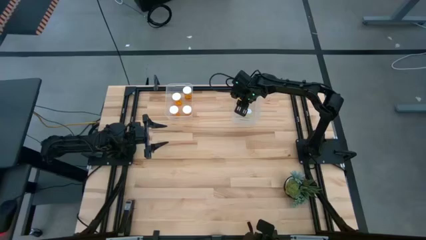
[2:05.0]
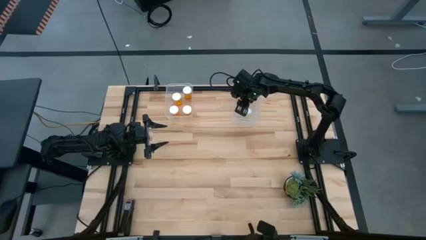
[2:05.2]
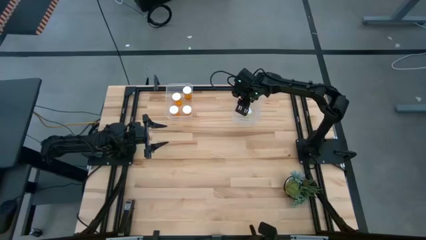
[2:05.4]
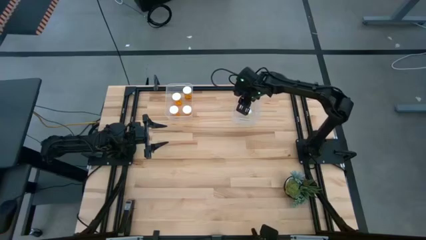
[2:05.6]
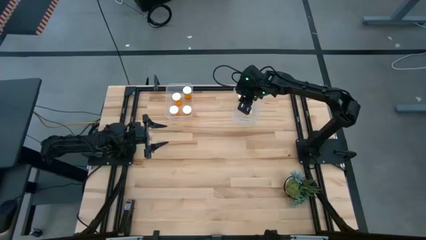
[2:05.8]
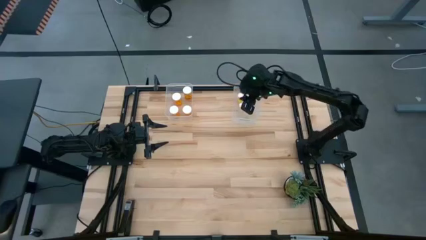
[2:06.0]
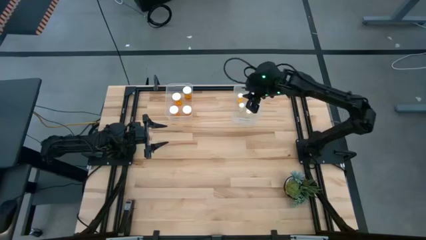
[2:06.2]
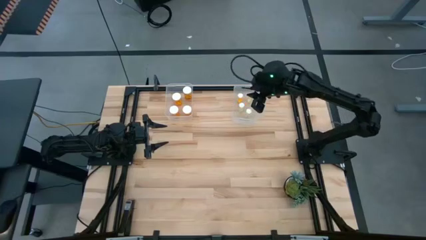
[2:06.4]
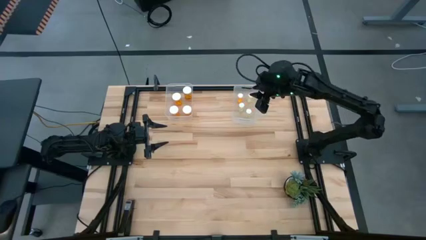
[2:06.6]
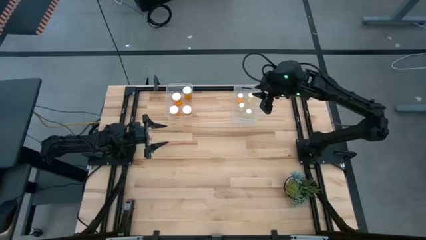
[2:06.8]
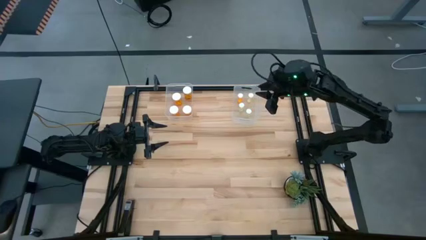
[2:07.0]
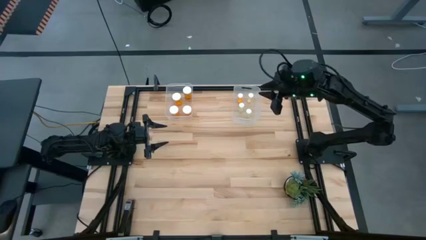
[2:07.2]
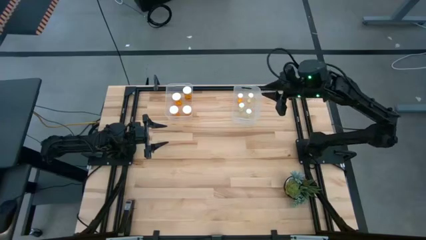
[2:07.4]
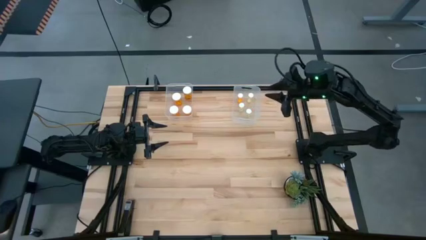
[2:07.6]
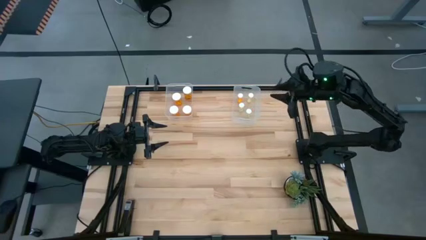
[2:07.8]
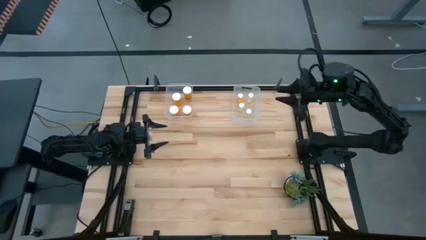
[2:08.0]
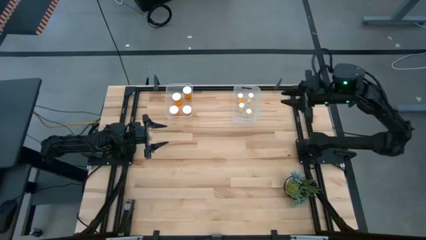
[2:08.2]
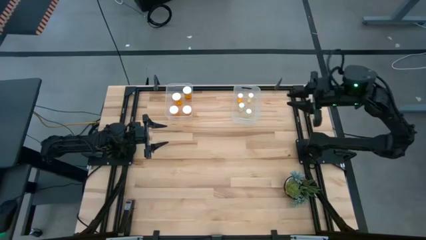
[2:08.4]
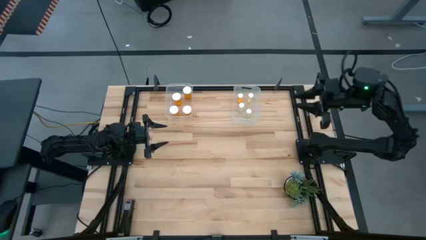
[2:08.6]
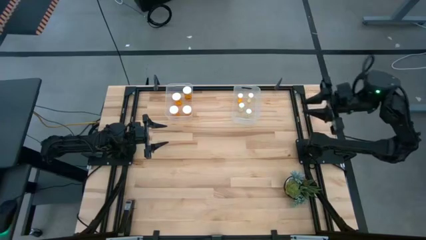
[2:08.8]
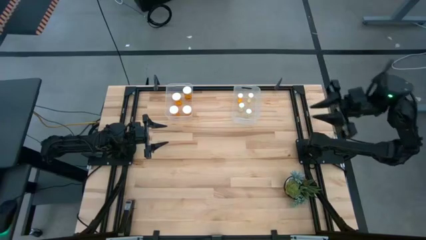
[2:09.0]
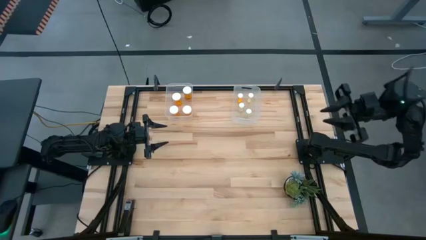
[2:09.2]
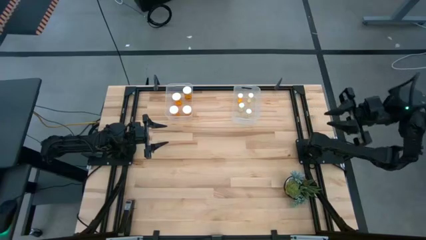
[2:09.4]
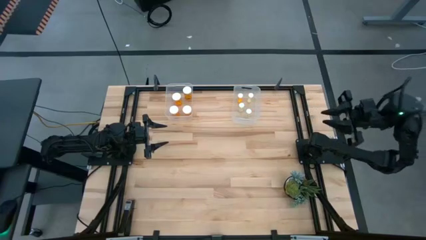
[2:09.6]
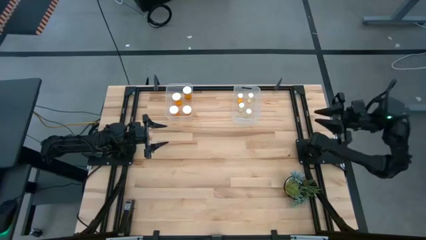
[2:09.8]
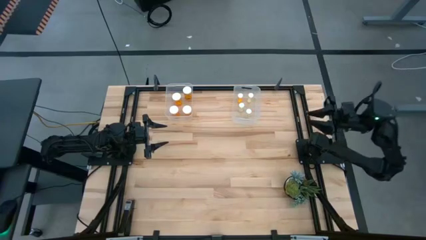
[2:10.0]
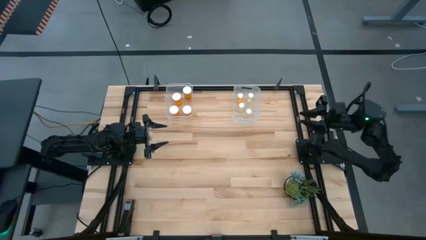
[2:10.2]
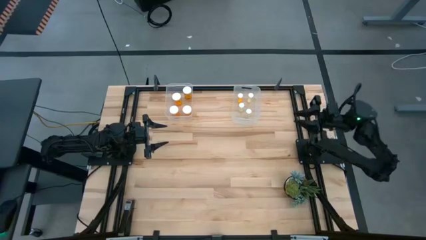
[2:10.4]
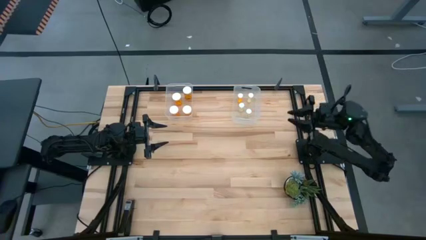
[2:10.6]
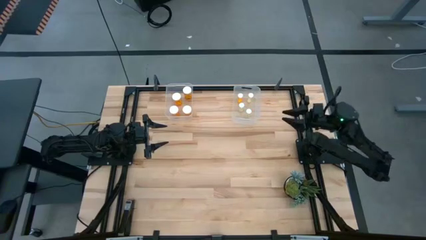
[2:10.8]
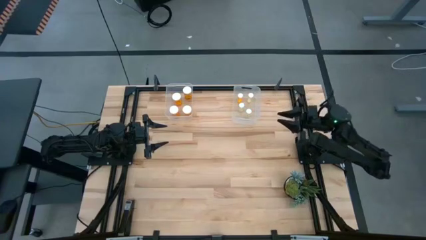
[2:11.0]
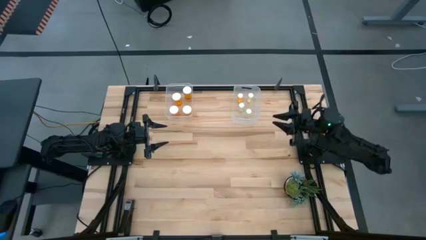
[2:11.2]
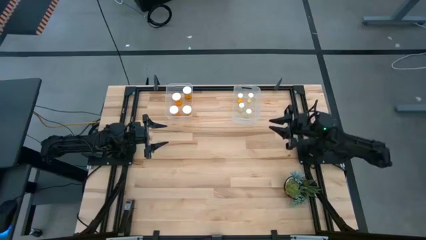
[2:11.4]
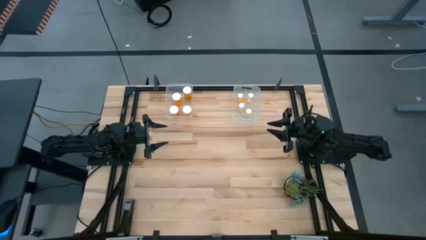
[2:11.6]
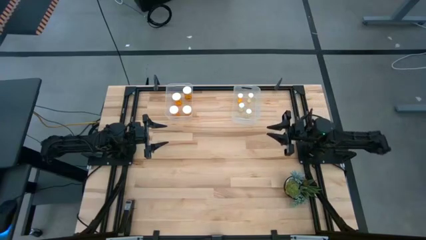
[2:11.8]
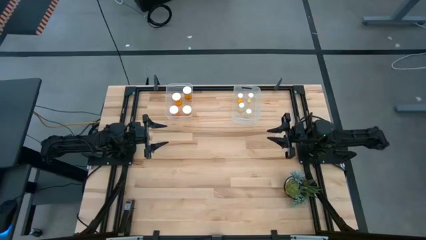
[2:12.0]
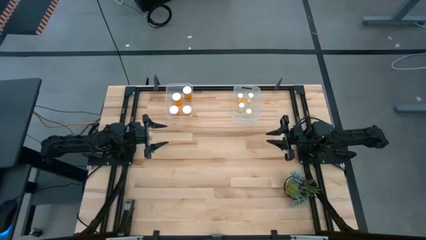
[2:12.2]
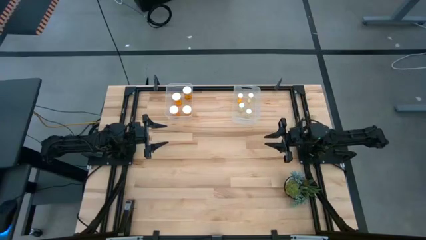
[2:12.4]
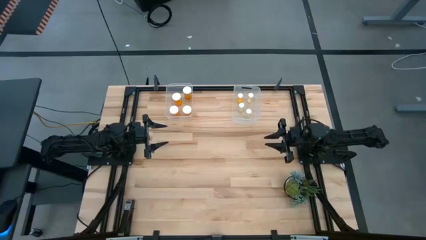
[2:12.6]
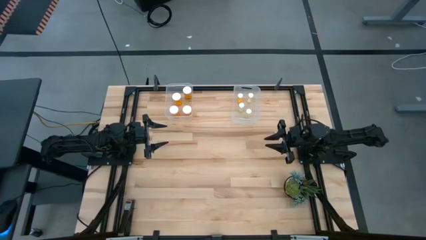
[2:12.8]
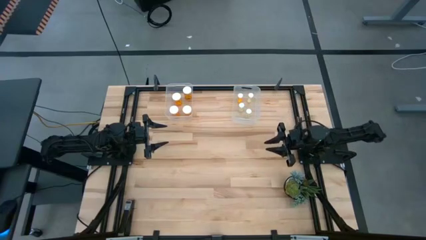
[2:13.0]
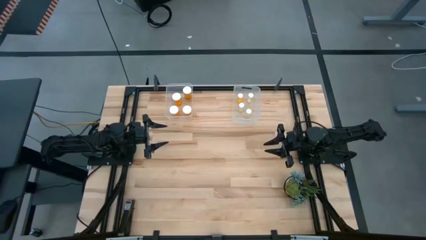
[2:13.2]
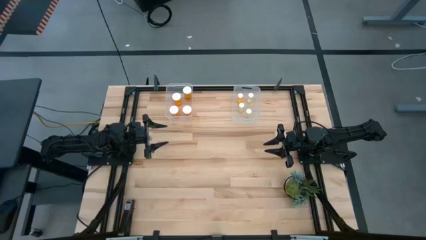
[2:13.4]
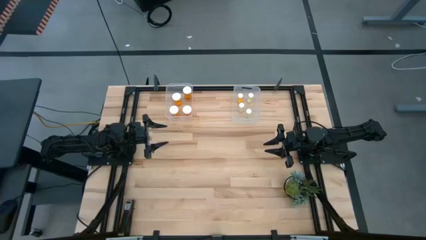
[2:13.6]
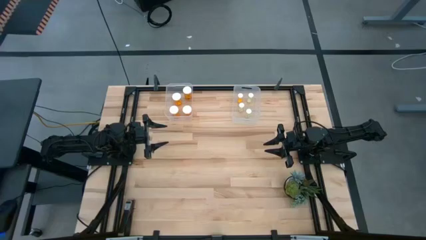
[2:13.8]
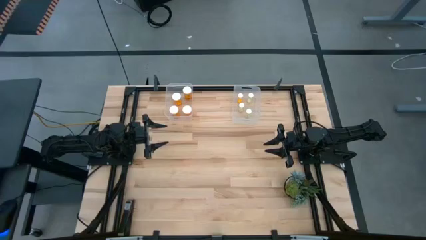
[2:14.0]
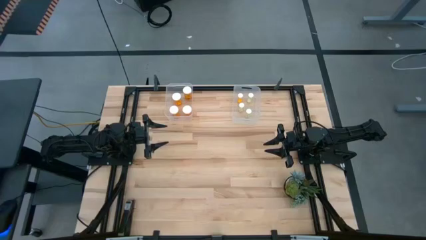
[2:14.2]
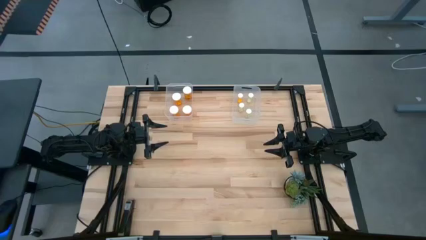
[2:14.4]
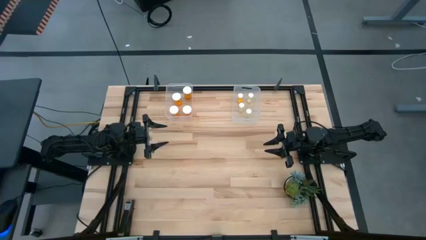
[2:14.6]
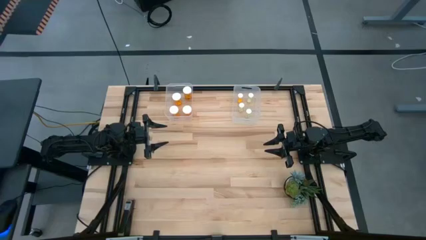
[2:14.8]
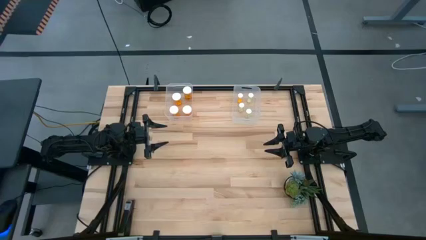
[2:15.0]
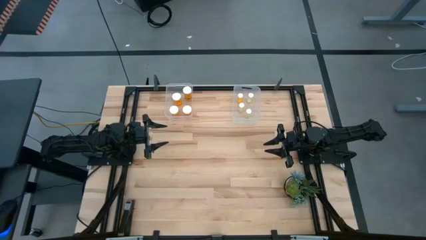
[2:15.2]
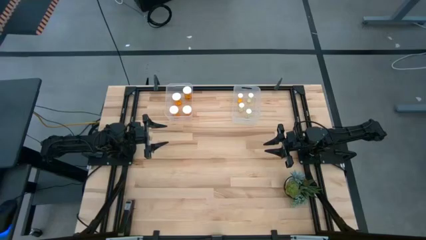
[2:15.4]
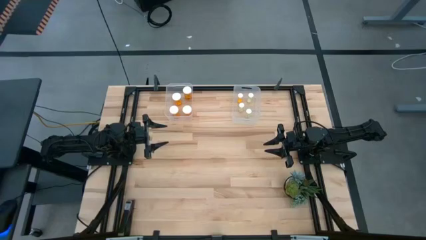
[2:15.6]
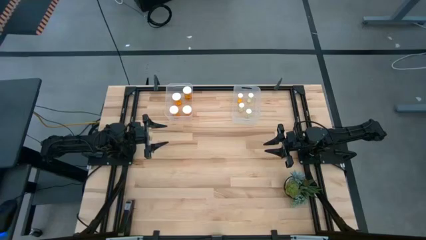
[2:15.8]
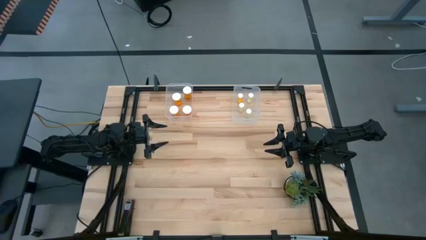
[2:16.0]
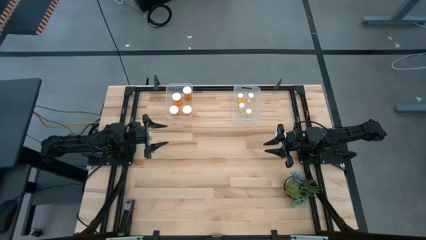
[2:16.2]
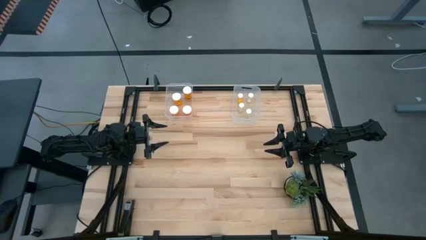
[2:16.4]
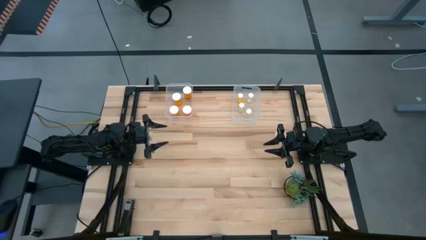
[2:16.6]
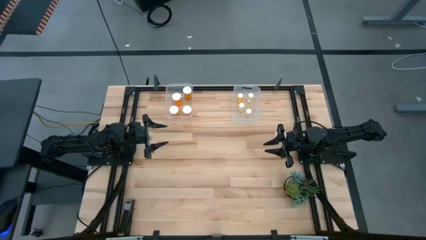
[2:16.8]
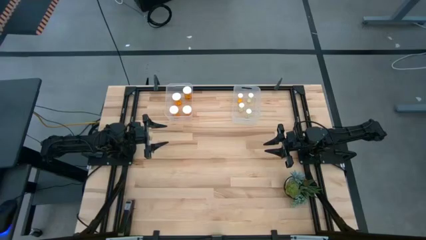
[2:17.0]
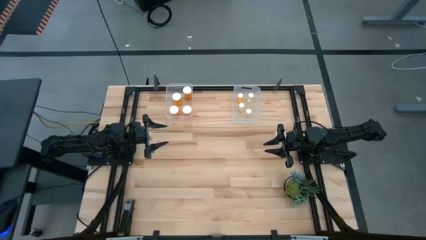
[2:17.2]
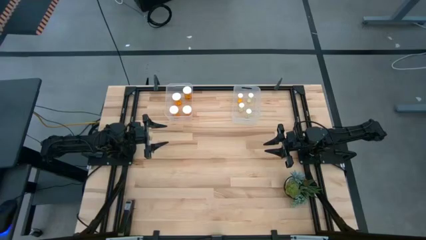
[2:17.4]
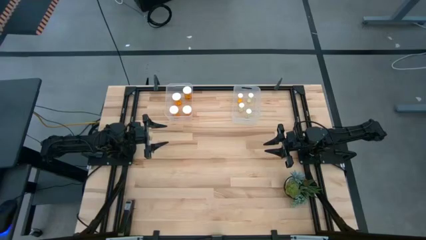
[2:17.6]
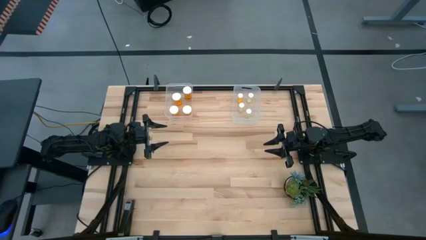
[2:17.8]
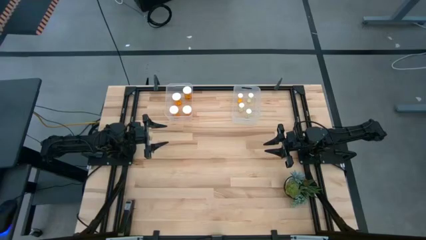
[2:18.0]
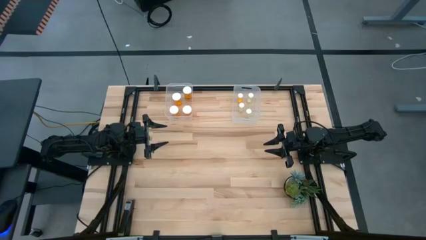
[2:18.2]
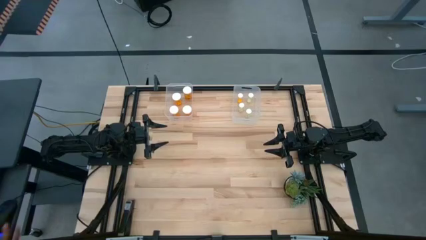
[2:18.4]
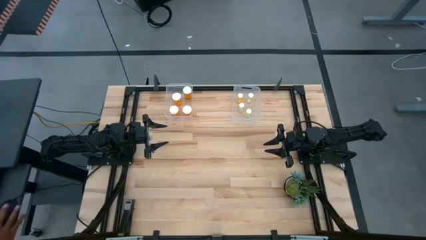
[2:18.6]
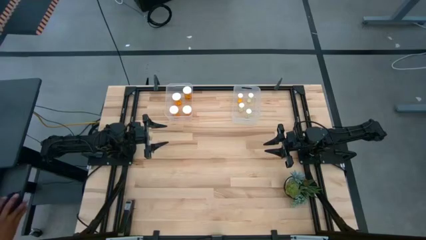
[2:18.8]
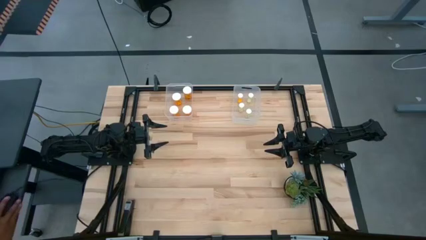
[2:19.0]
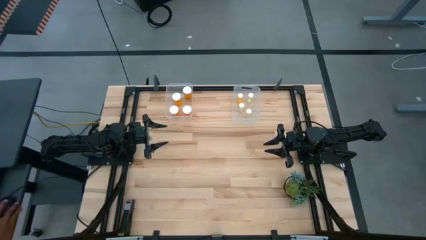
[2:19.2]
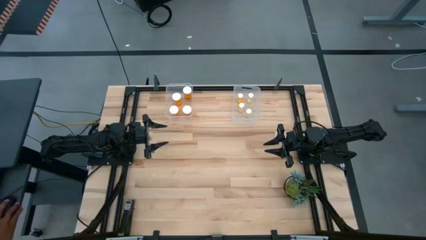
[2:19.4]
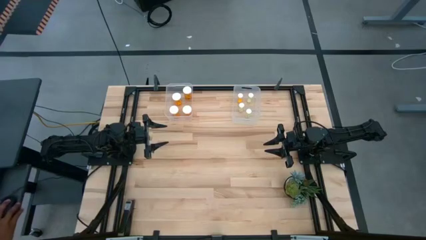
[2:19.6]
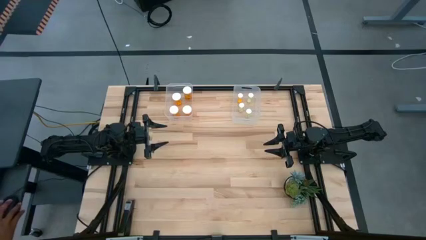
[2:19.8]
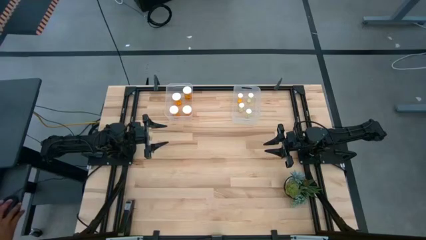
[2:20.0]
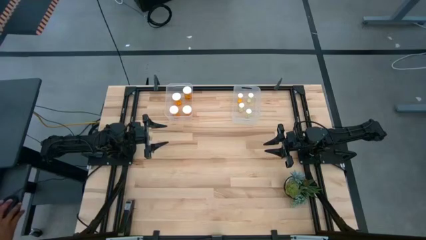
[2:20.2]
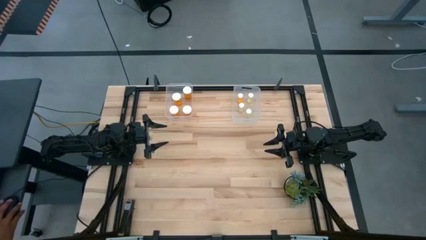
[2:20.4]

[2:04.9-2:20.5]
Task: Pick and place medicine bottles into bin by pill shape (circle, oval)
Return to Home Position
